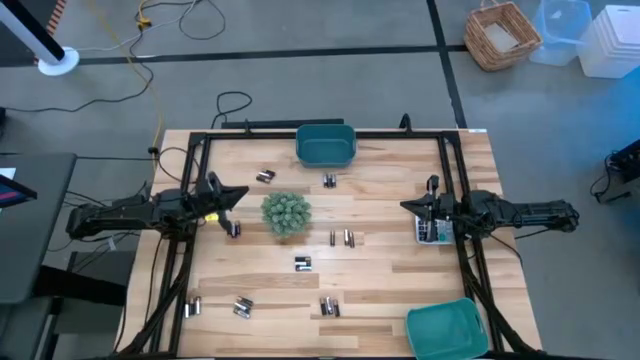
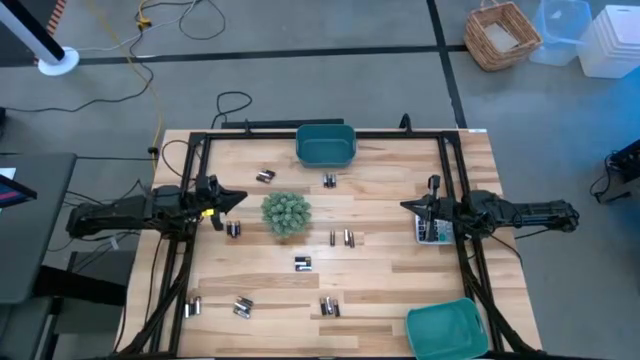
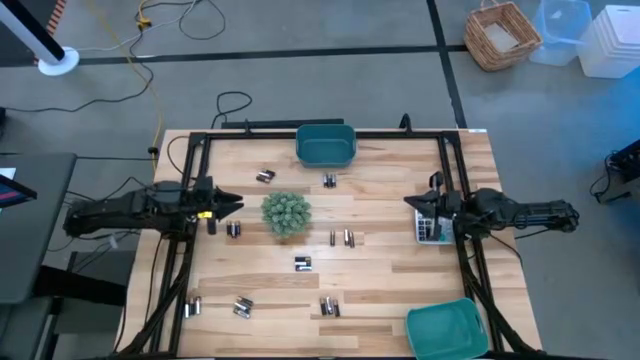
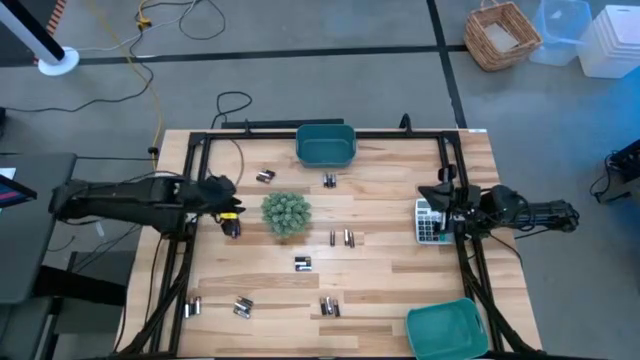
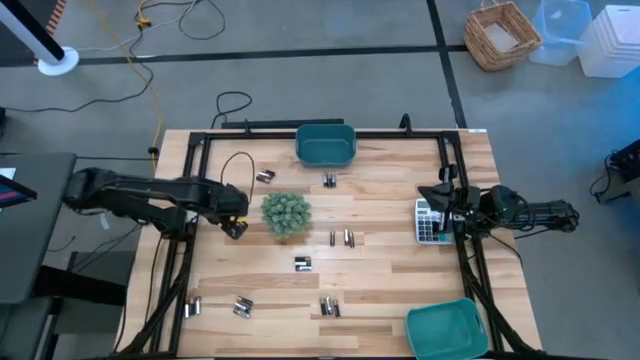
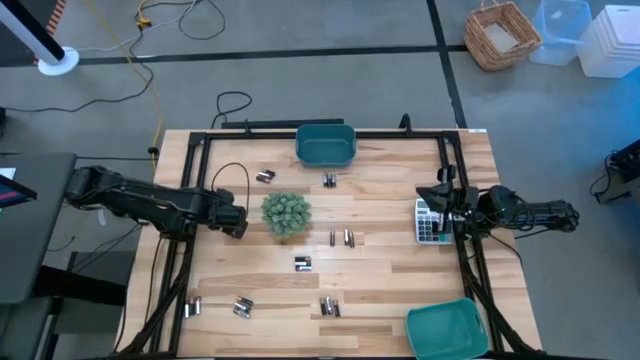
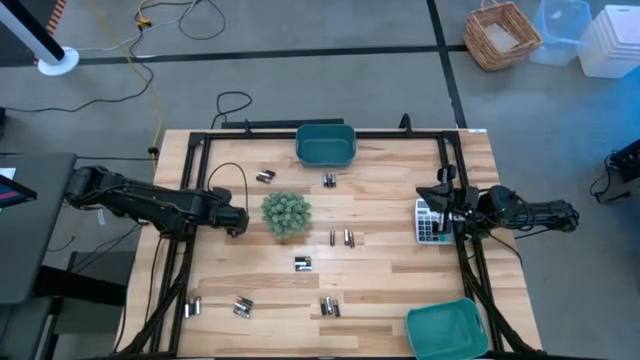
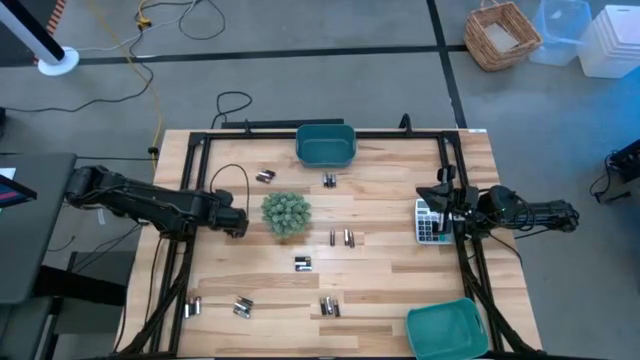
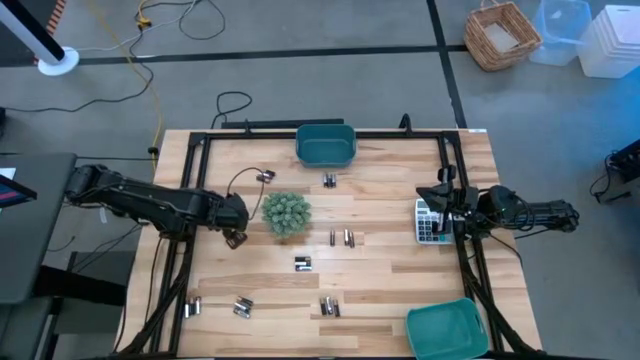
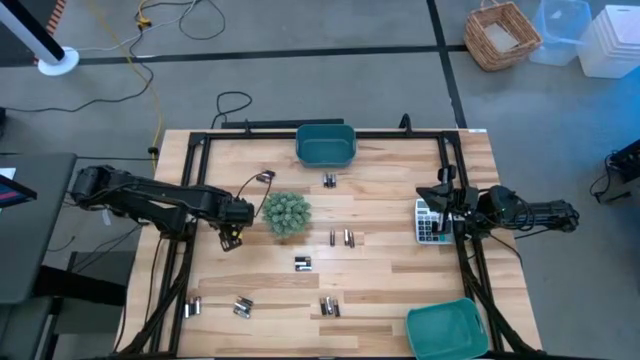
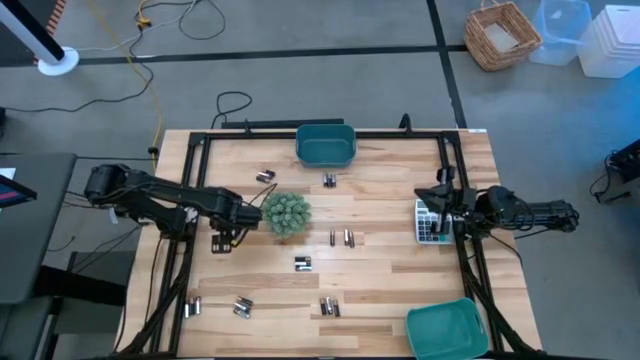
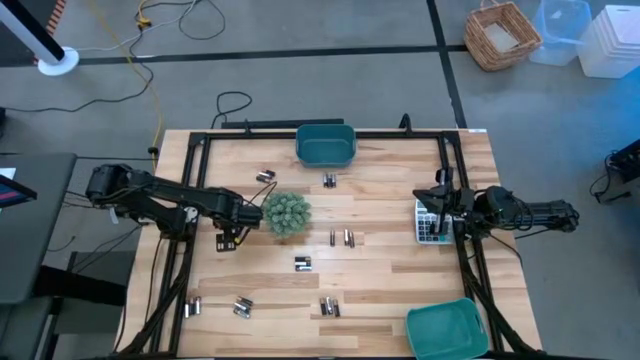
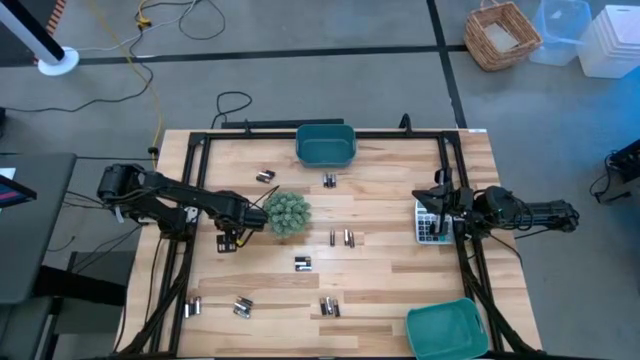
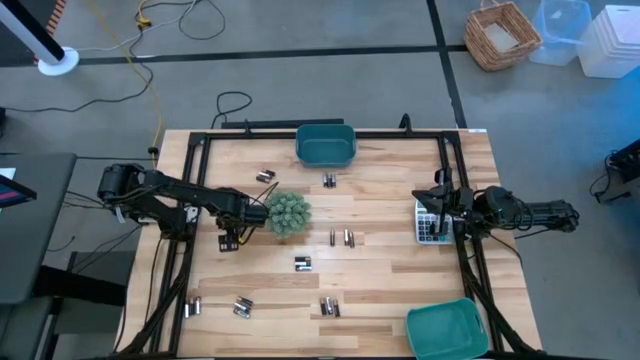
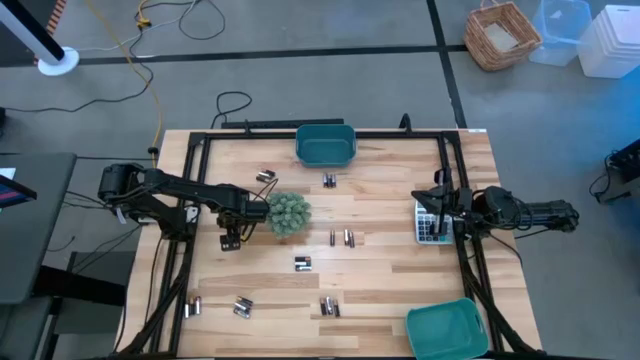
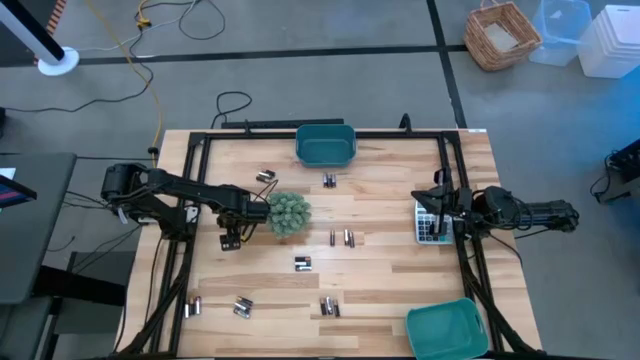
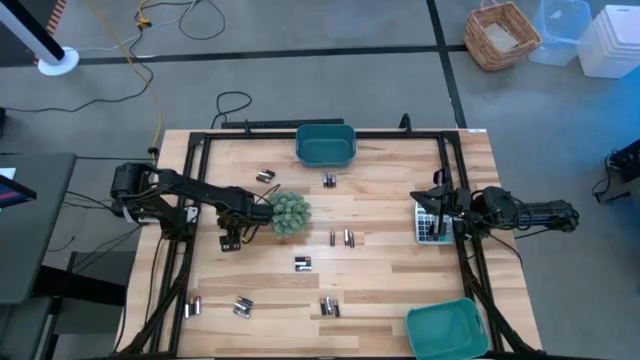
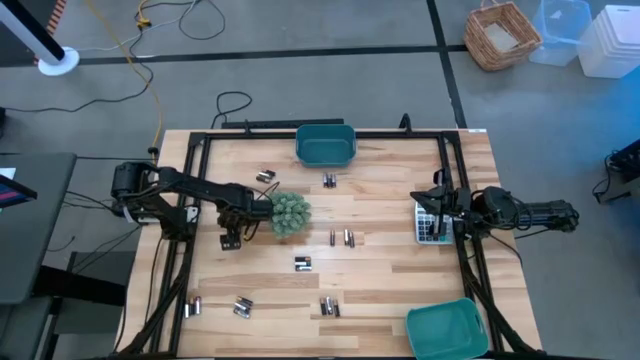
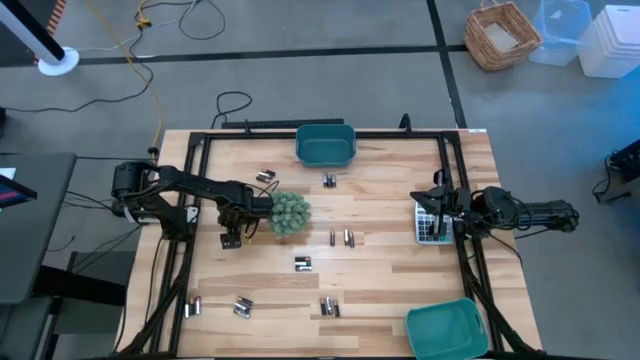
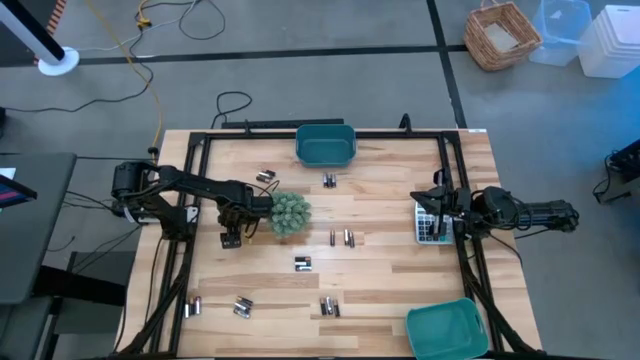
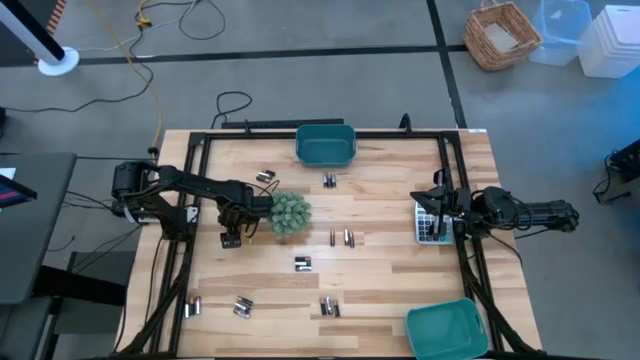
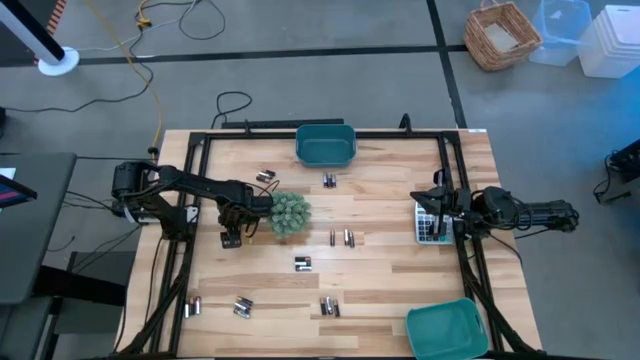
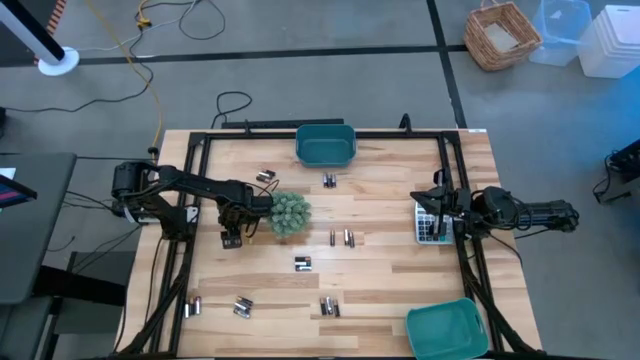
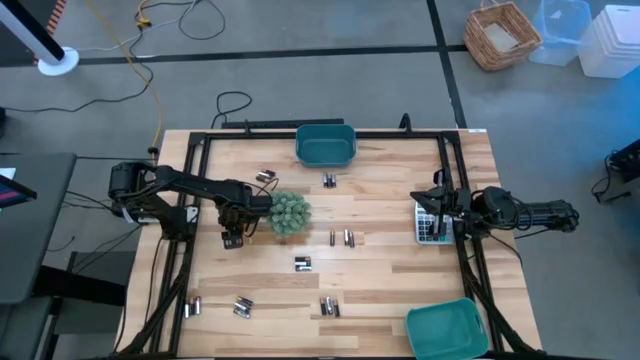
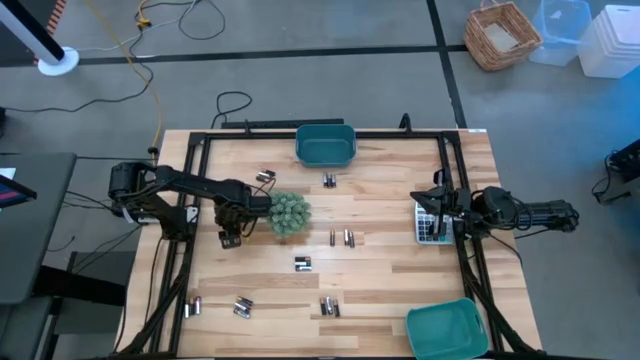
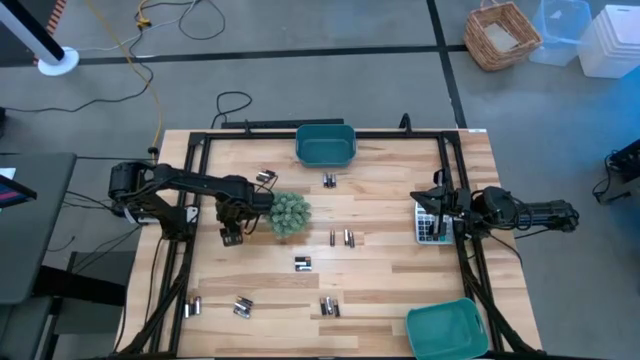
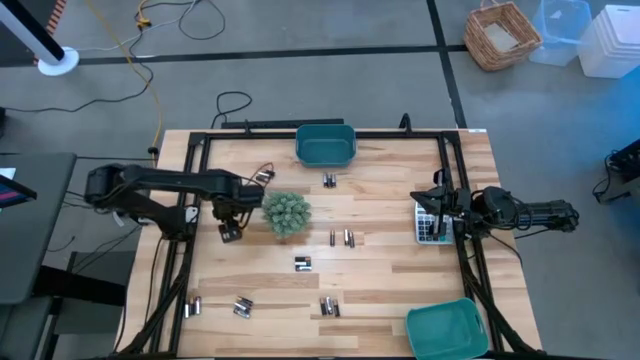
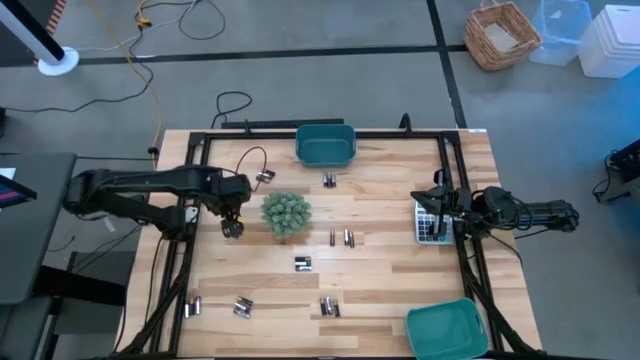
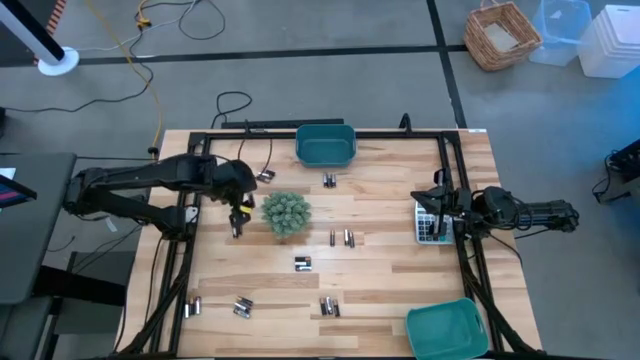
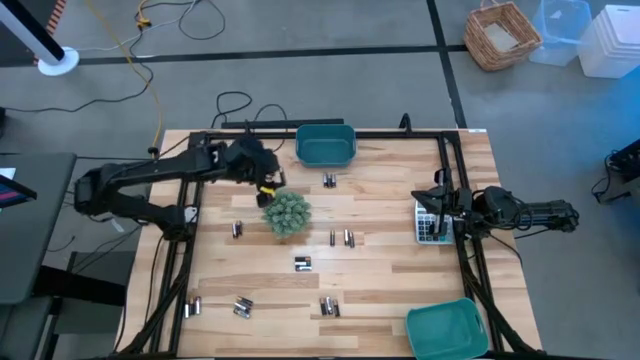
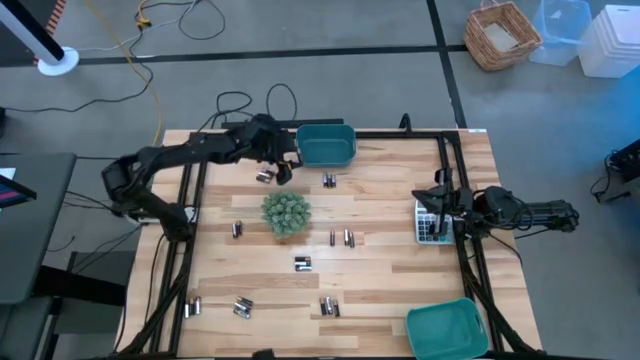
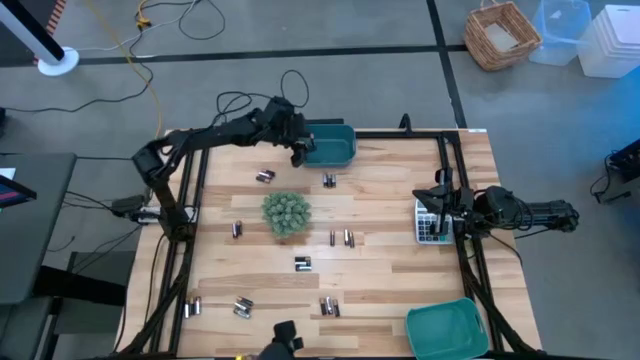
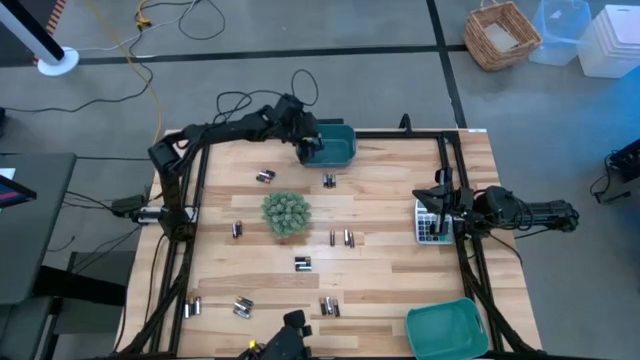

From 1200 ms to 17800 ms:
Task: Sort batteries
Put the black battery into the blue bin

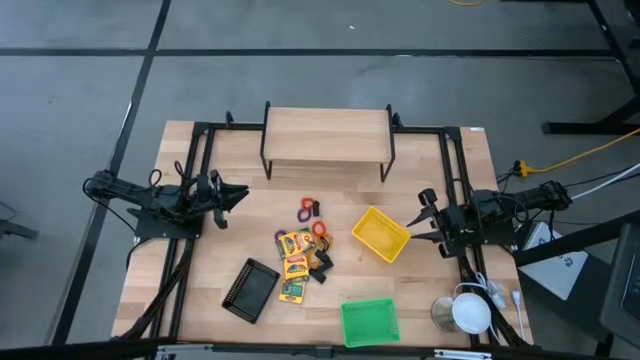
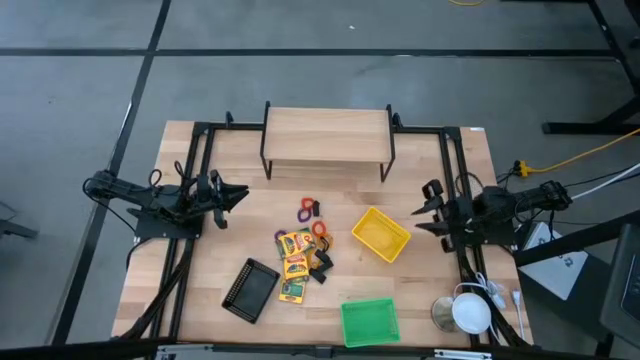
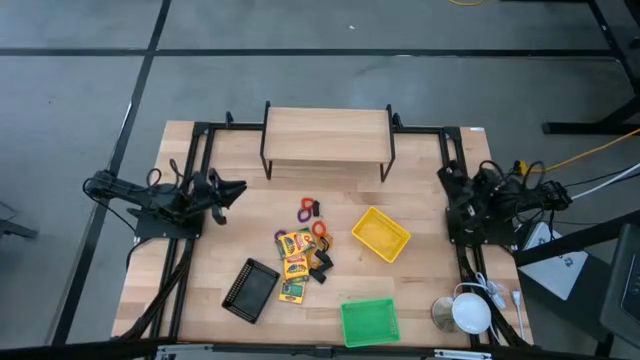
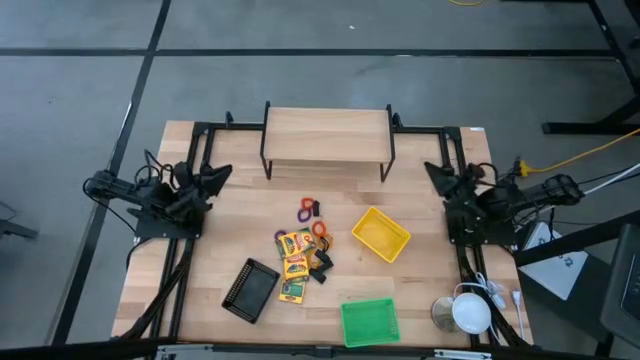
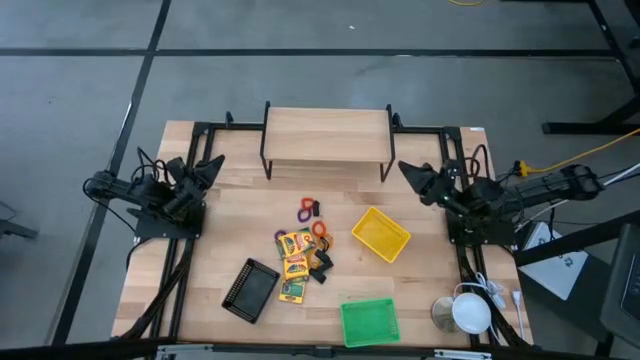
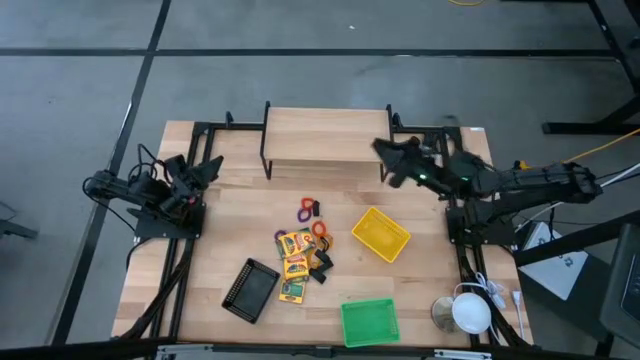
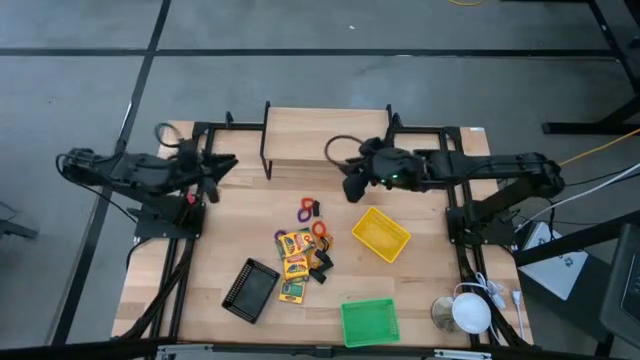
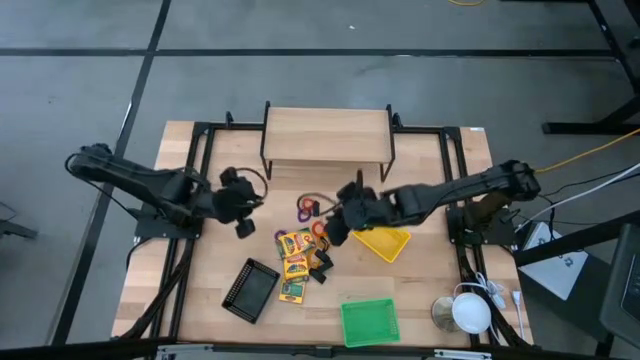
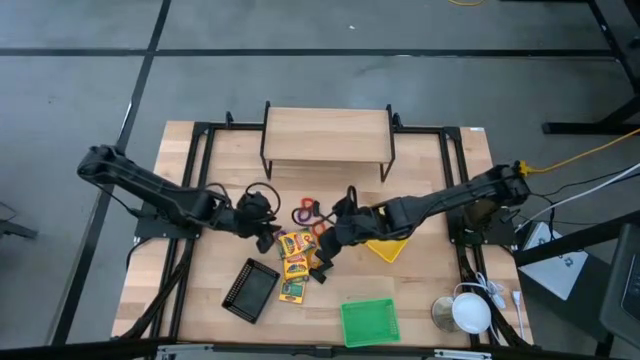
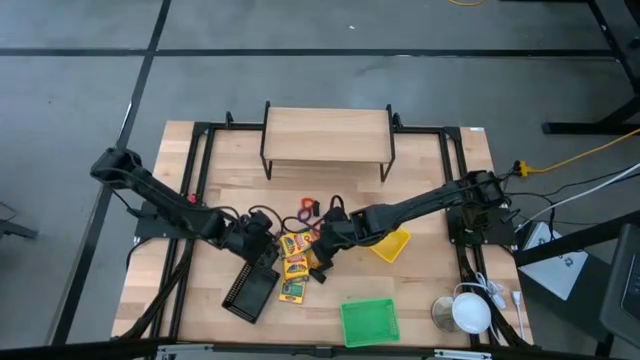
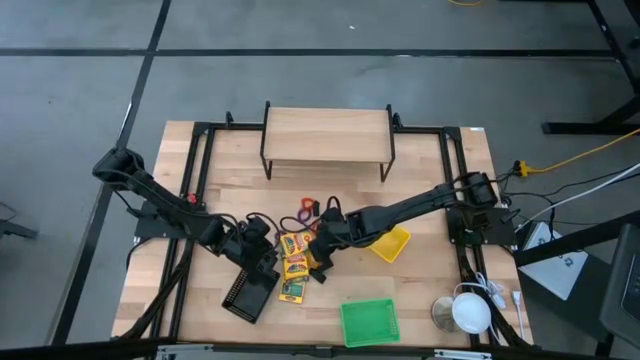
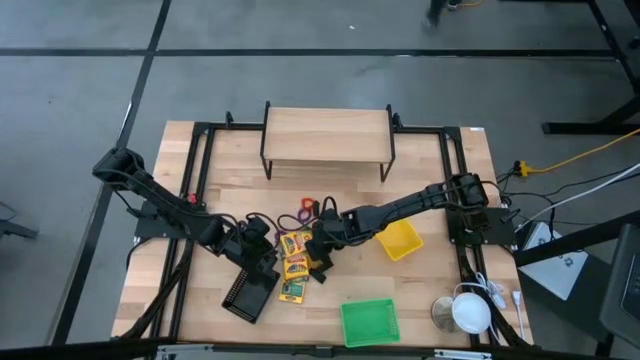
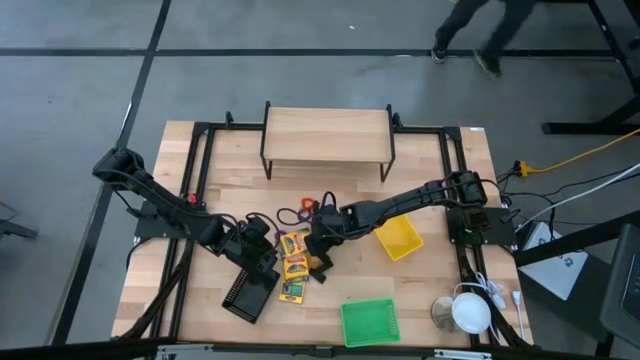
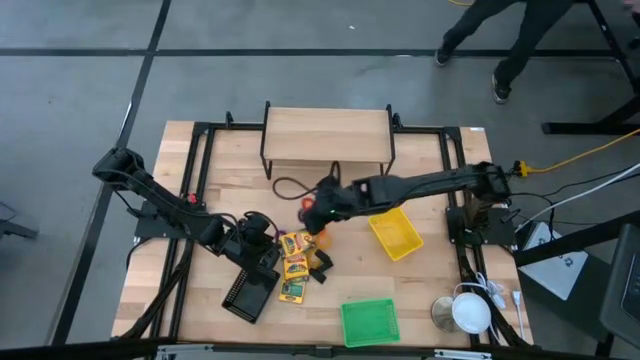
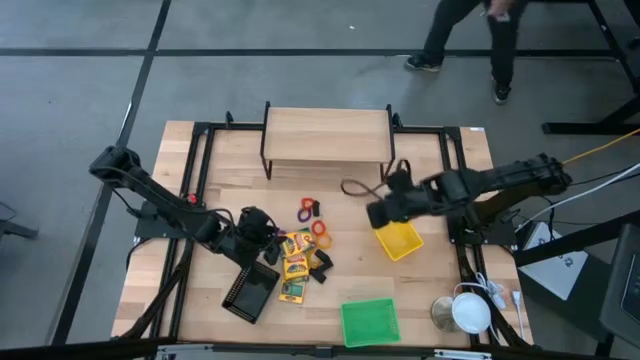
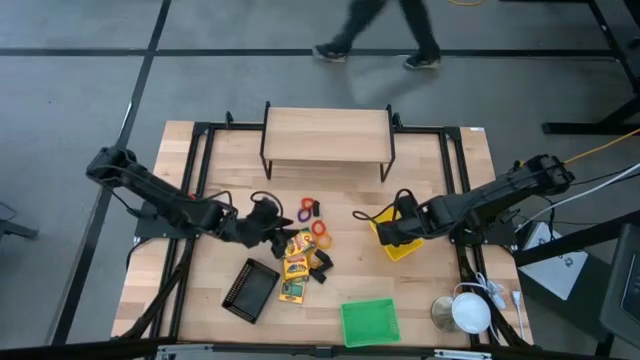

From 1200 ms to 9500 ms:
Task: Pick & Place Office Desk Supplies
Put the black rubber band into the yellow basket
